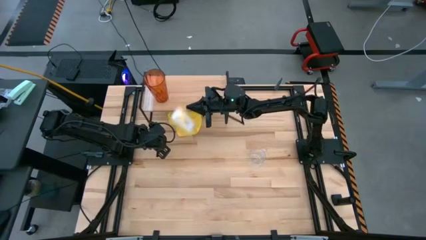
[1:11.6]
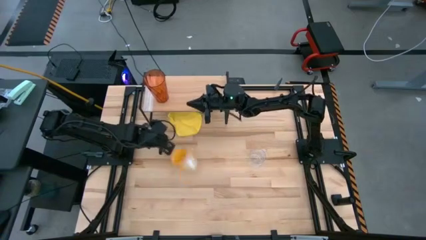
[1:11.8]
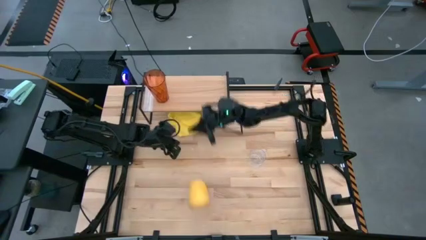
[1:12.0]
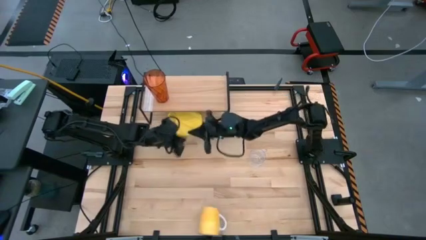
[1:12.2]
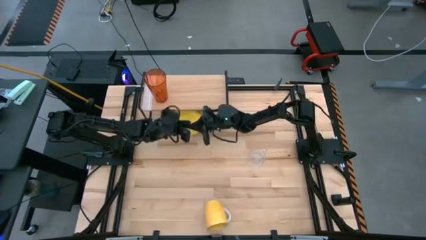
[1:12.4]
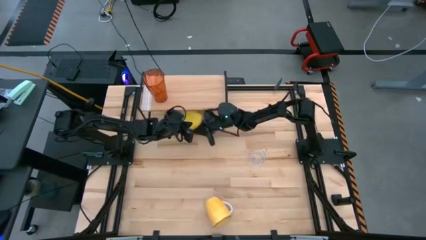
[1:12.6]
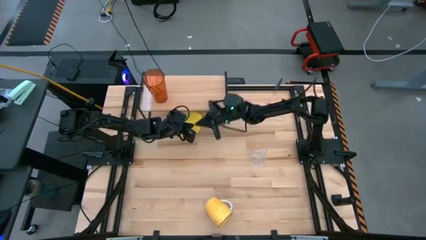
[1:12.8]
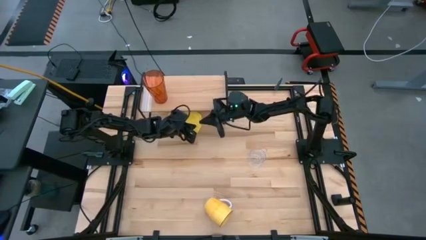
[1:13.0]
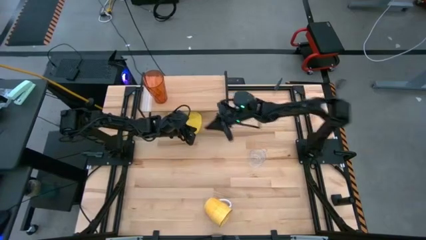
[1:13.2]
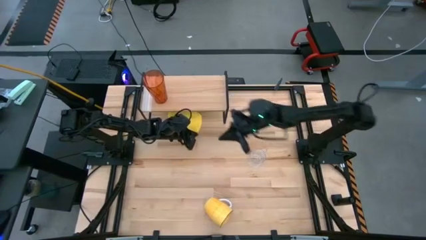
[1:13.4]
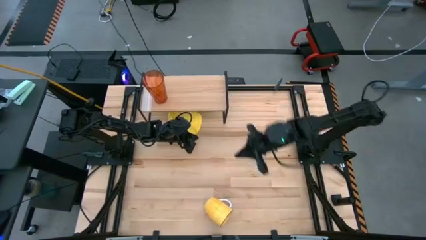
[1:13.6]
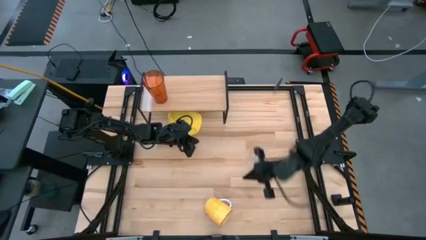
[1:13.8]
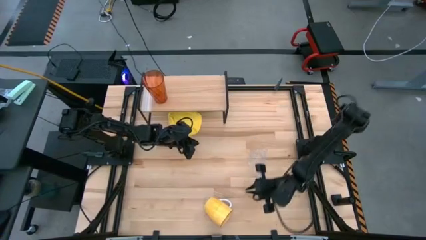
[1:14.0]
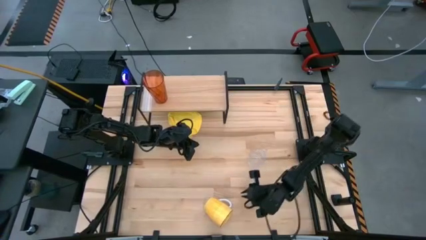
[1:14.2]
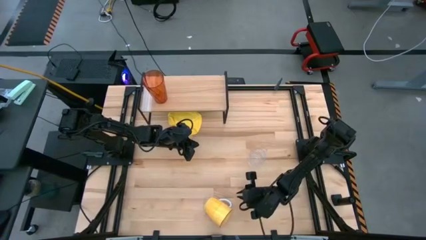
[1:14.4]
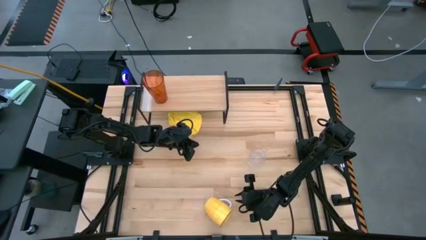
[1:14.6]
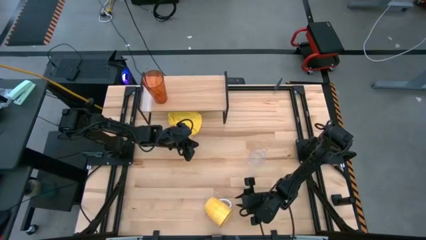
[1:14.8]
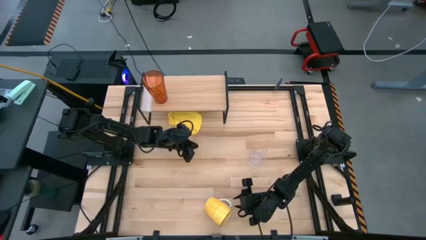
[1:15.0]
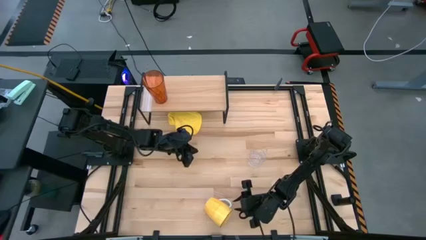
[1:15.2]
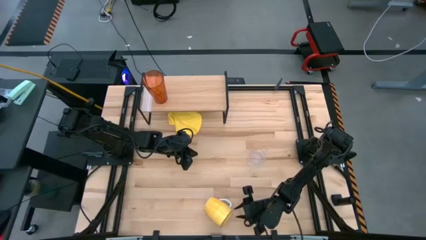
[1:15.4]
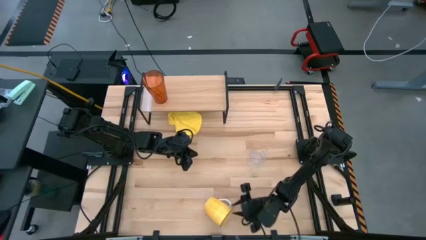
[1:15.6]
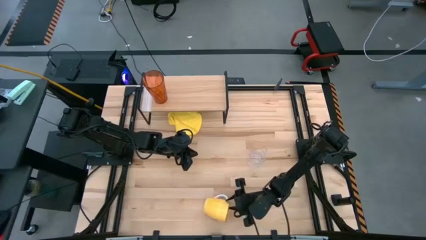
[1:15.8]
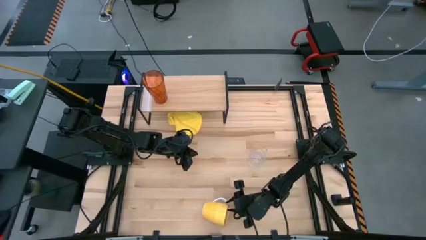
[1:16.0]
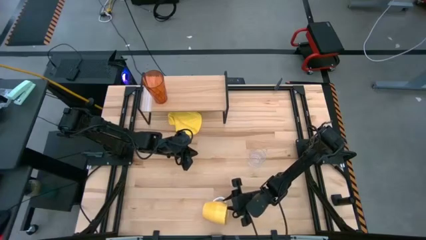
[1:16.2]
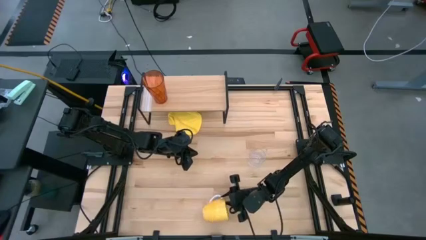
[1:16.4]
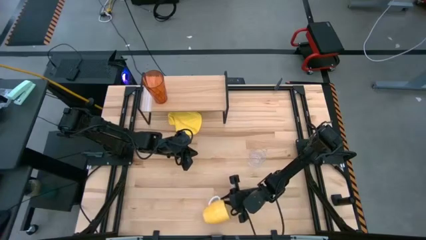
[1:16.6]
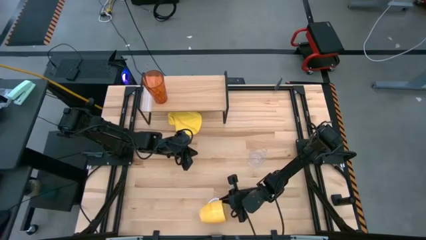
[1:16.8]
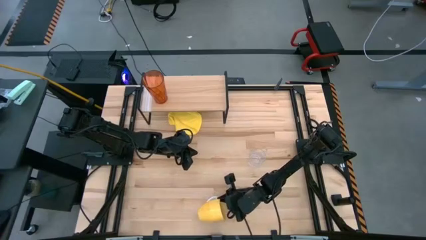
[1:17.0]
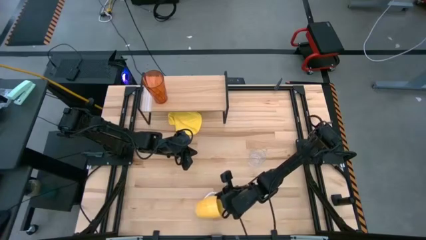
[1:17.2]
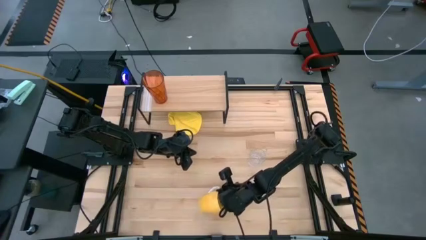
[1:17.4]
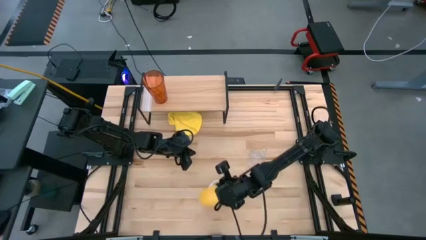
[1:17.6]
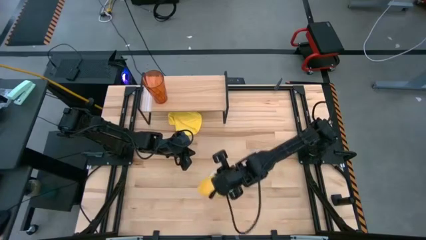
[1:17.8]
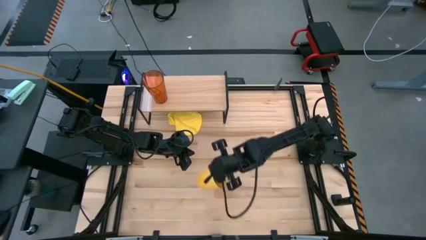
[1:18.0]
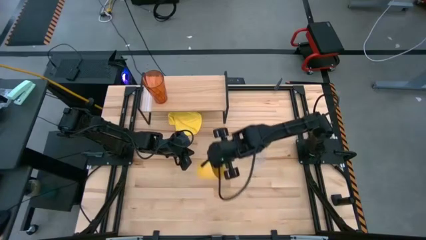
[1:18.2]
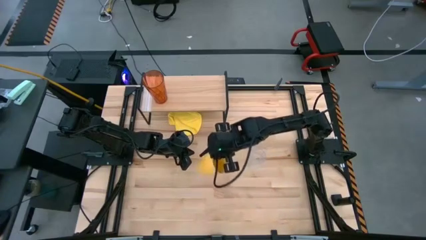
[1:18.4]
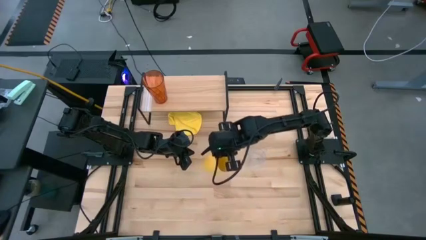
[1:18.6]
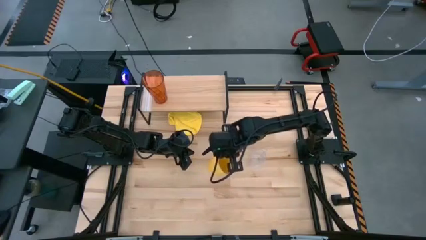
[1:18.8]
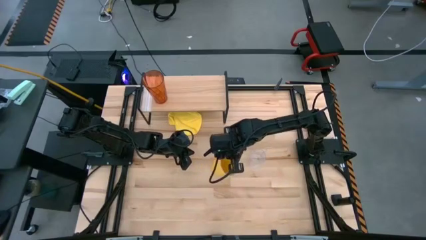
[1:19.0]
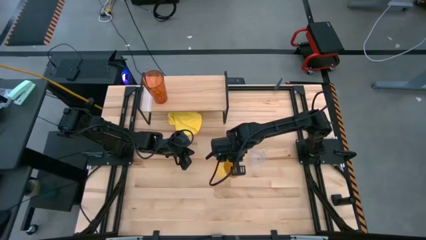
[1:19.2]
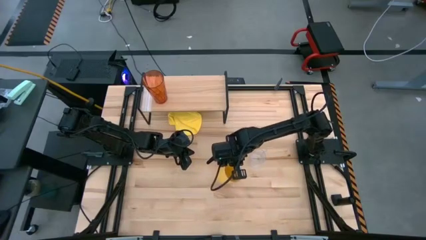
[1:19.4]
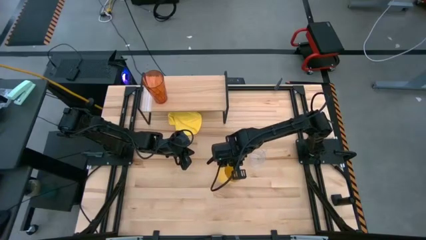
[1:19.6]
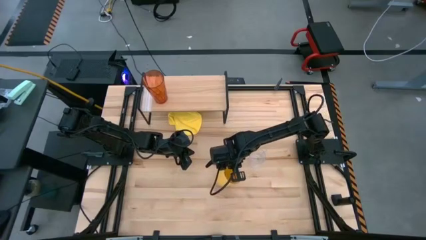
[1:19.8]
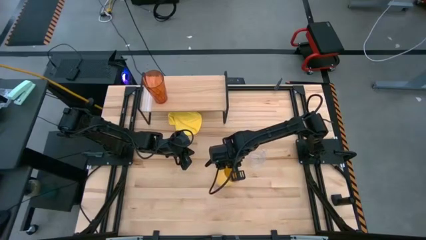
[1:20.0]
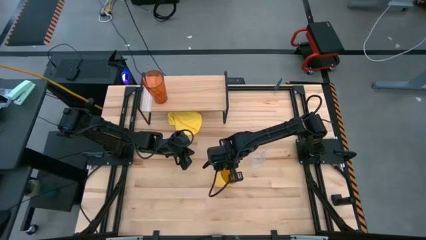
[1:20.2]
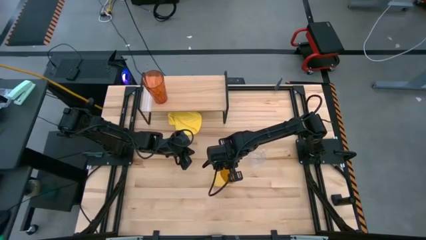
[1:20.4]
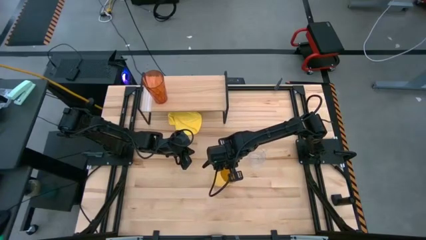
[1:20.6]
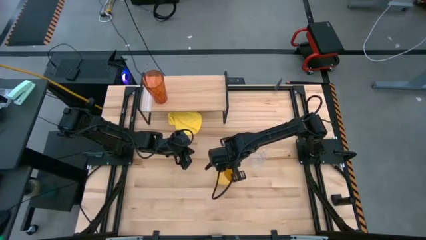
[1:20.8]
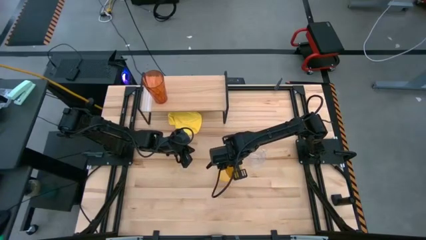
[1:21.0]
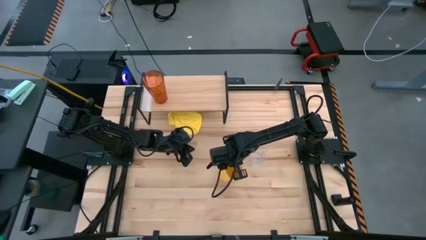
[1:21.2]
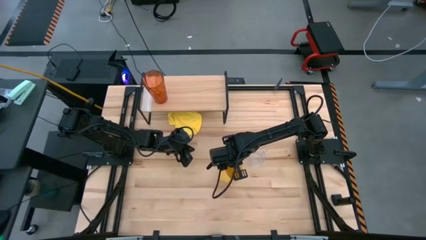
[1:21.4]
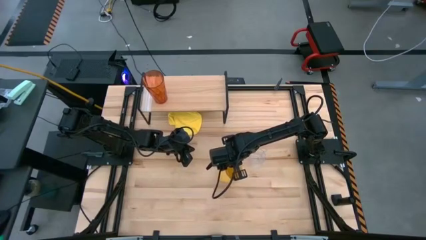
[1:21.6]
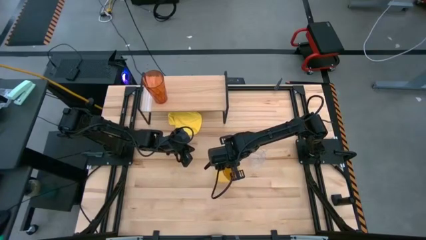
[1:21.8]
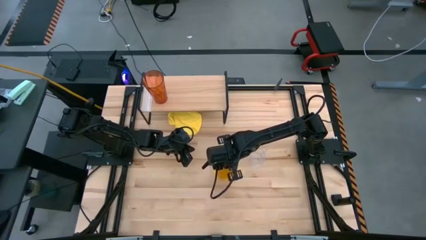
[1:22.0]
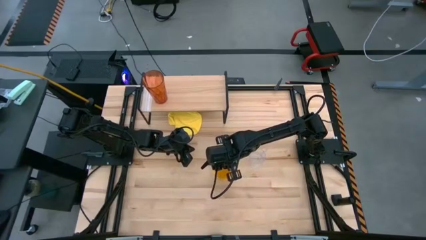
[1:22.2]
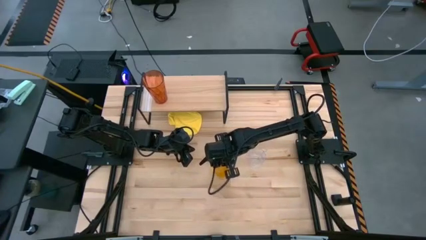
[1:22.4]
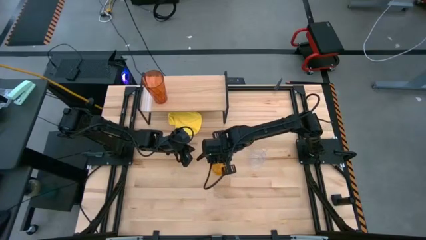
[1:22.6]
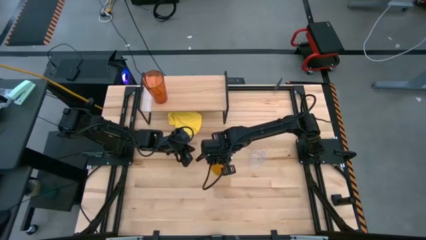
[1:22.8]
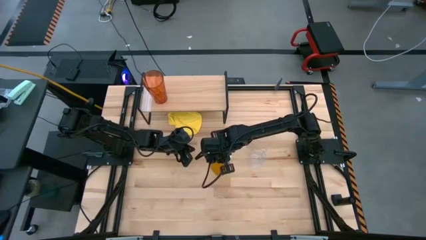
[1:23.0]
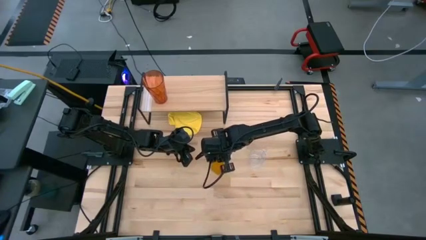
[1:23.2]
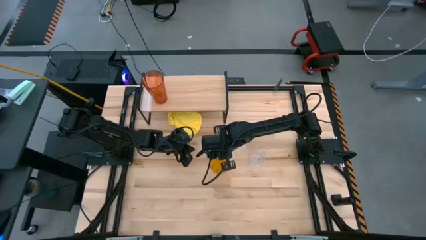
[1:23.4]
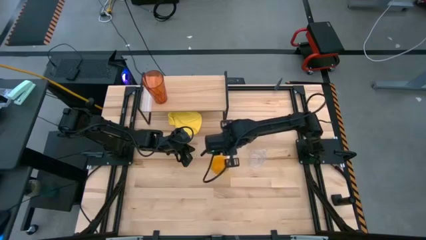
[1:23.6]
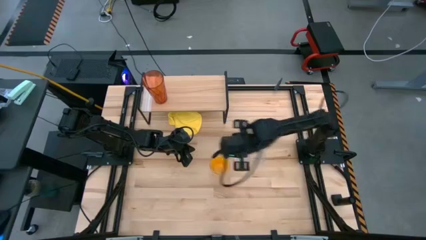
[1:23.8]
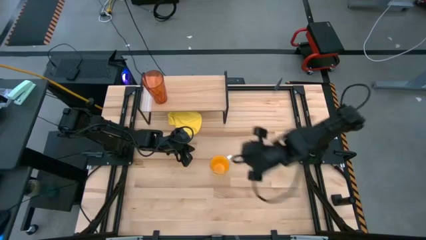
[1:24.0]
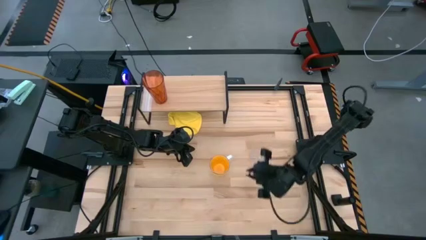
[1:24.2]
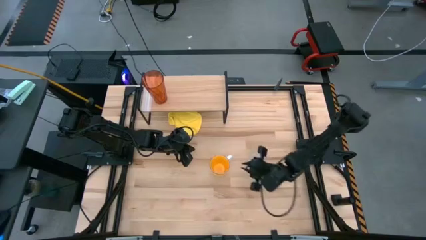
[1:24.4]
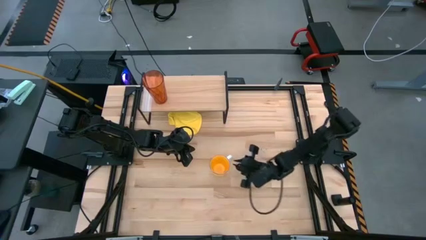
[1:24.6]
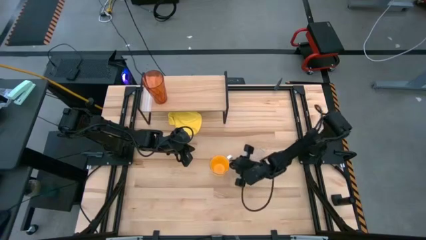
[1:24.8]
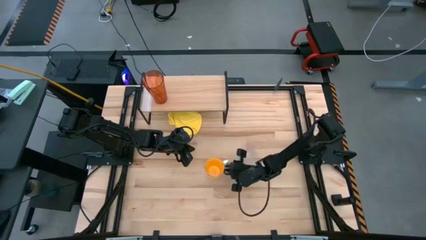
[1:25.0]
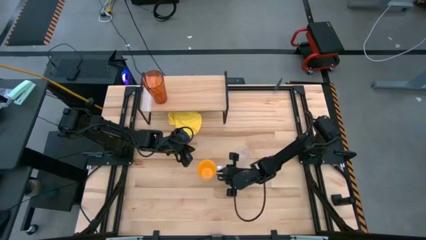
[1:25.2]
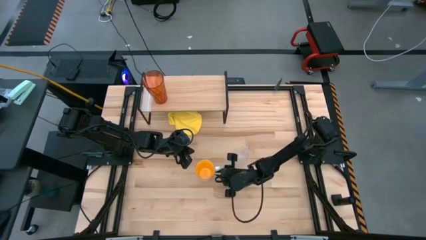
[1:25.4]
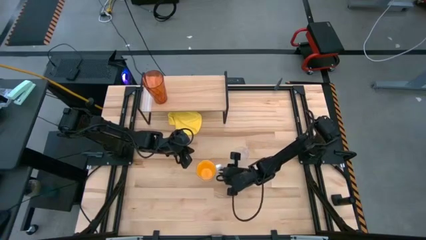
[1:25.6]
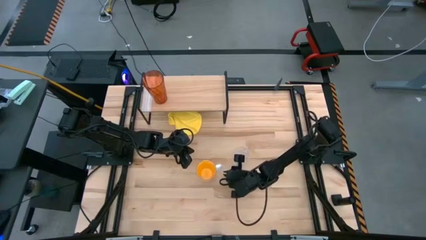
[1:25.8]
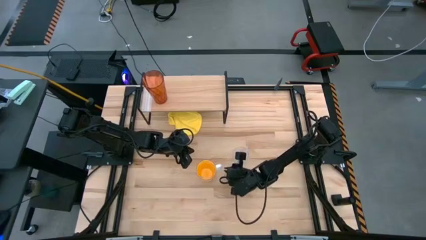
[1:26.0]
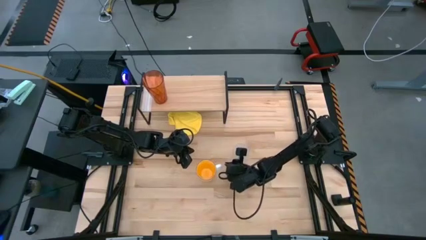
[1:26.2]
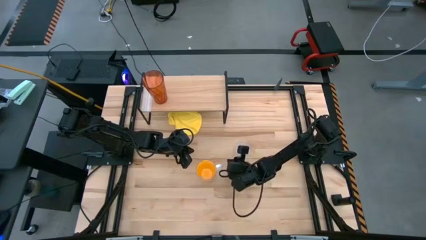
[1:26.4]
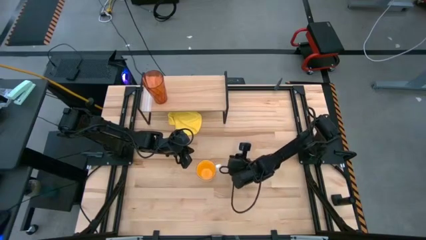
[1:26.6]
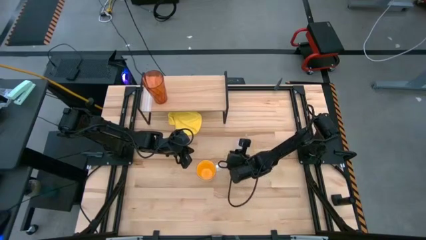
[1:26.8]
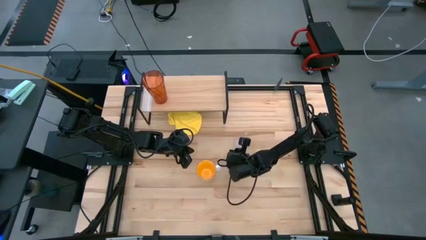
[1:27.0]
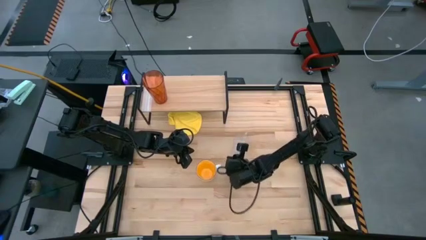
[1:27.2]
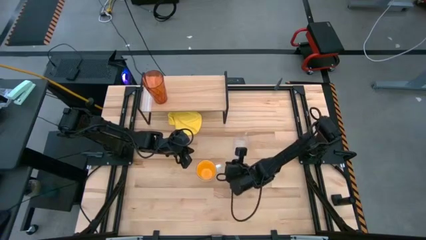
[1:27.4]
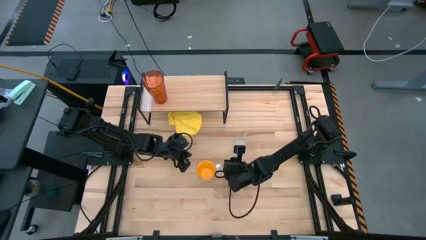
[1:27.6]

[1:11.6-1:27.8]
Task: Stack small to large cups/mugs on shelf
Put the yellow mug on the shelf

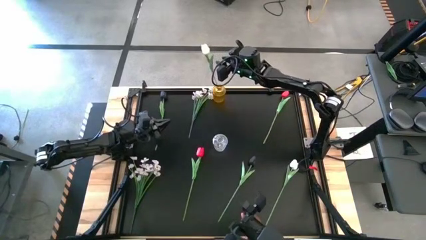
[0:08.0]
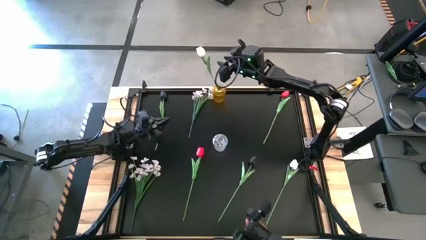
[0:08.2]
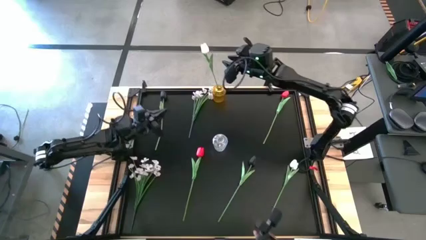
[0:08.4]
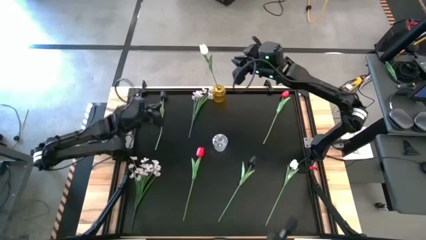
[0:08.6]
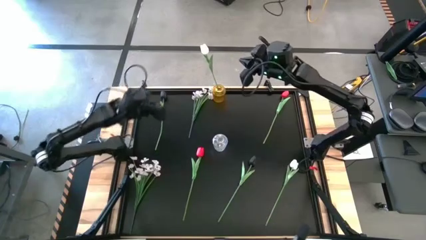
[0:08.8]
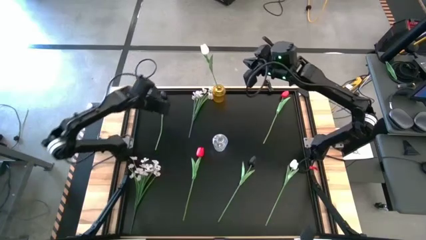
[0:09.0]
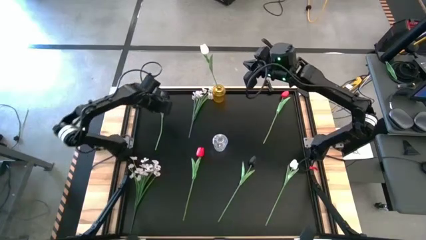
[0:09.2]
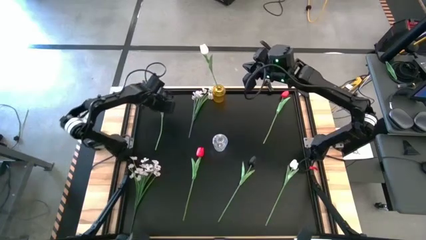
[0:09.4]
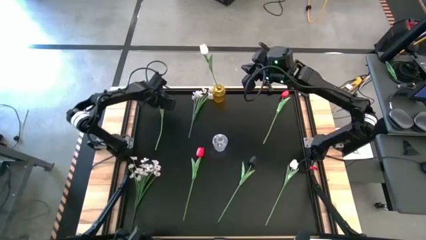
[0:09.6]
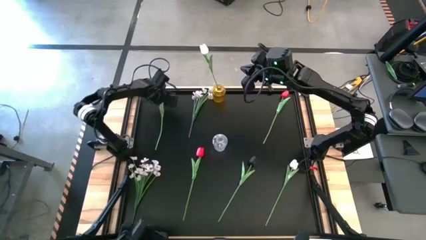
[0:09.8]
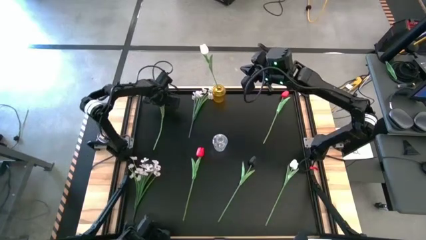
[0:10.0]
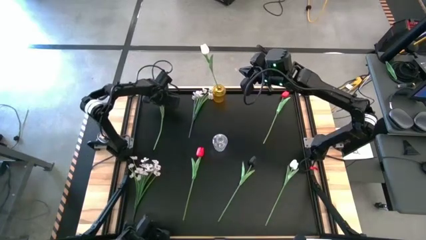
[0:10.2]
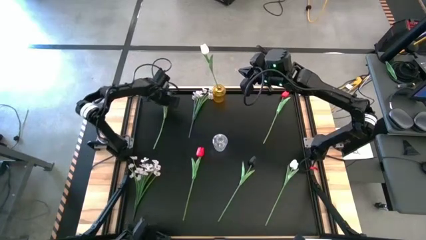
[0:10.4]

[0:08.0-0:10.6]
Task: Sort flowers into vase by color
Put the top black tulip into the transparent vase
